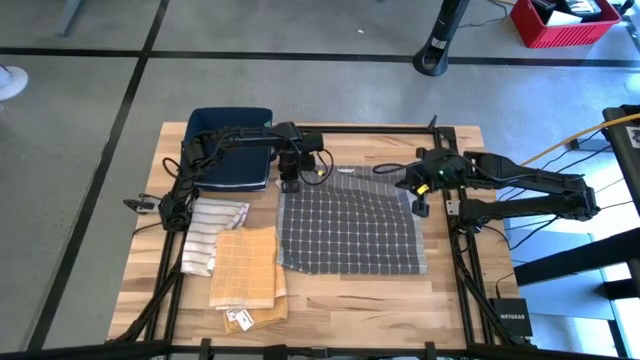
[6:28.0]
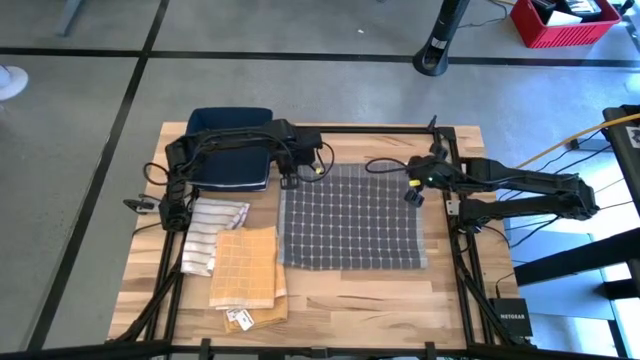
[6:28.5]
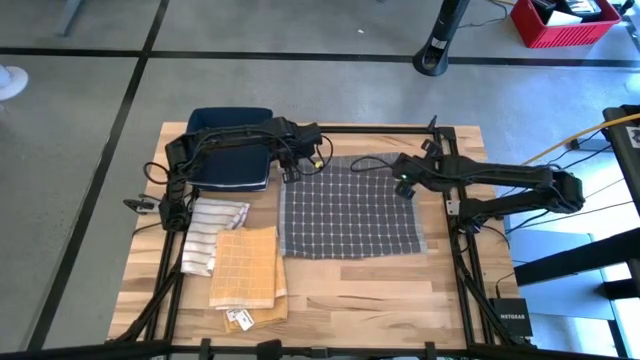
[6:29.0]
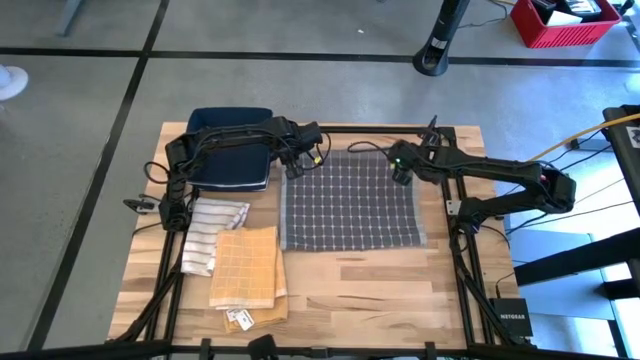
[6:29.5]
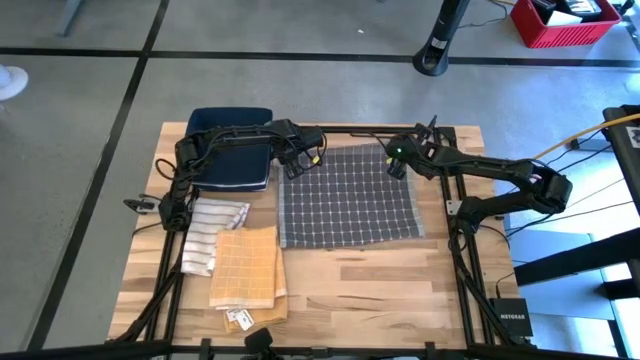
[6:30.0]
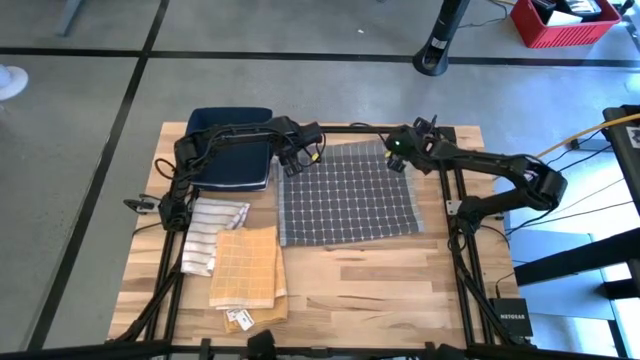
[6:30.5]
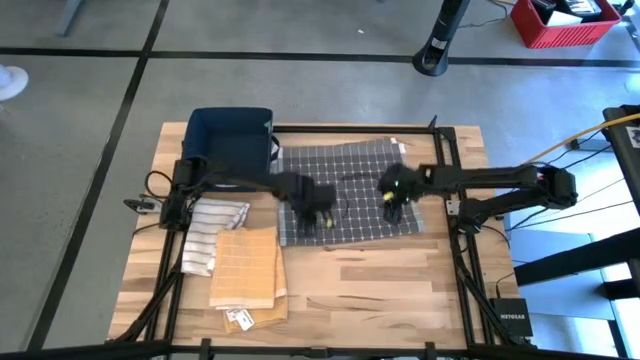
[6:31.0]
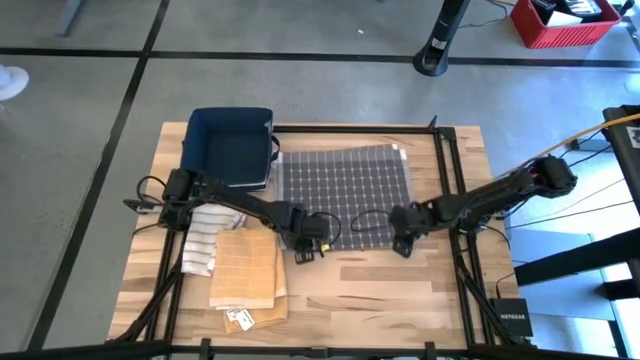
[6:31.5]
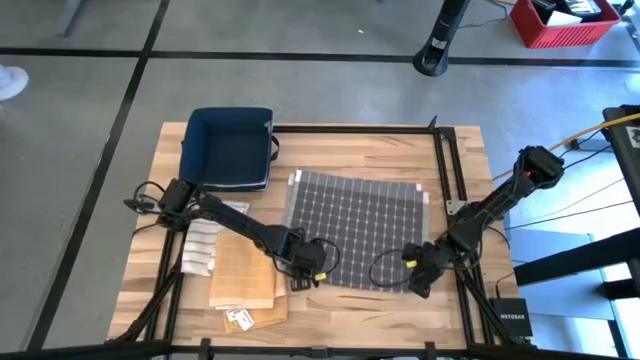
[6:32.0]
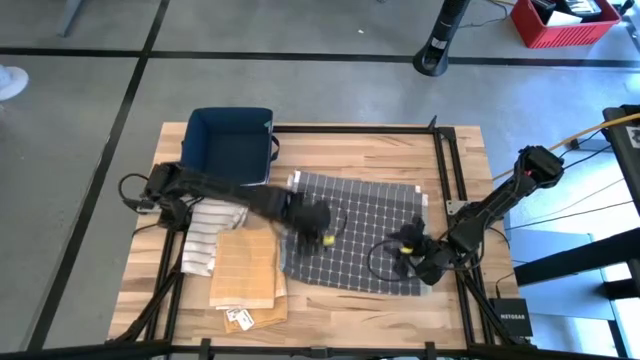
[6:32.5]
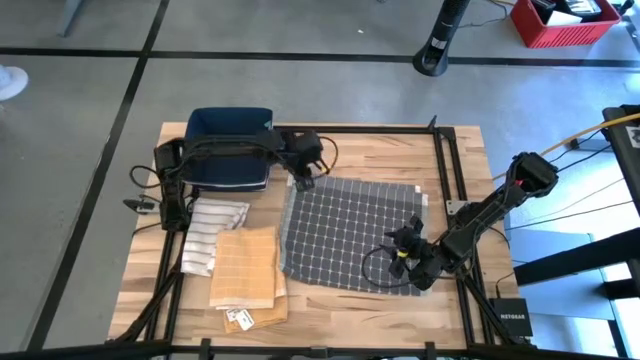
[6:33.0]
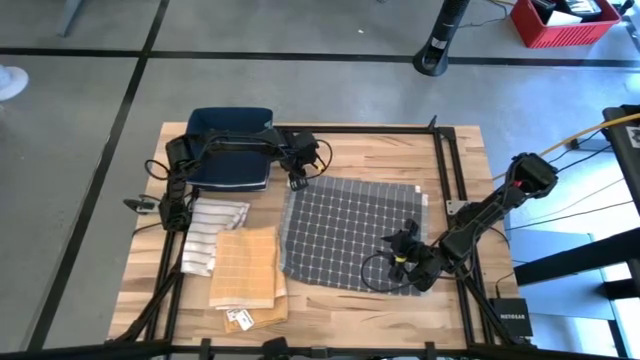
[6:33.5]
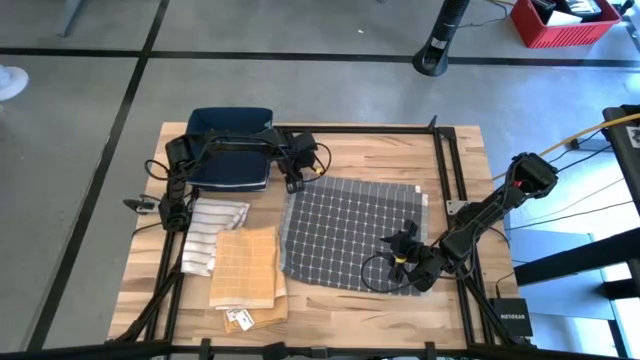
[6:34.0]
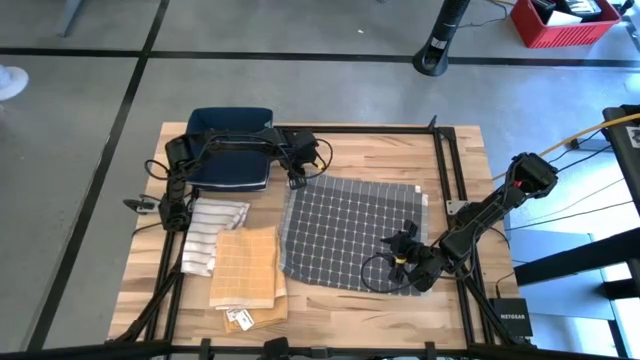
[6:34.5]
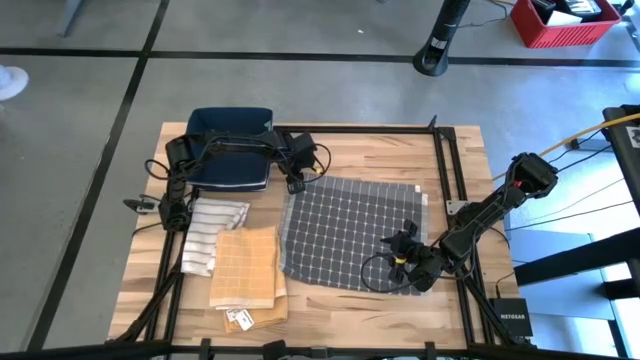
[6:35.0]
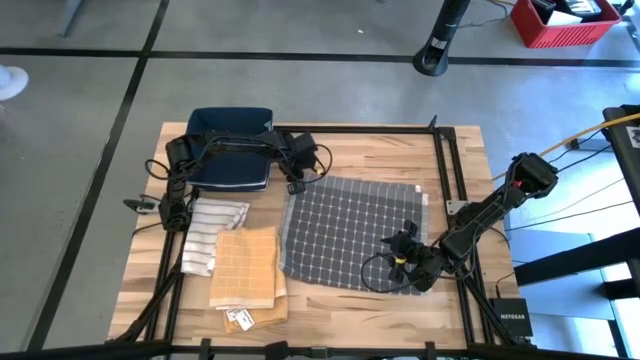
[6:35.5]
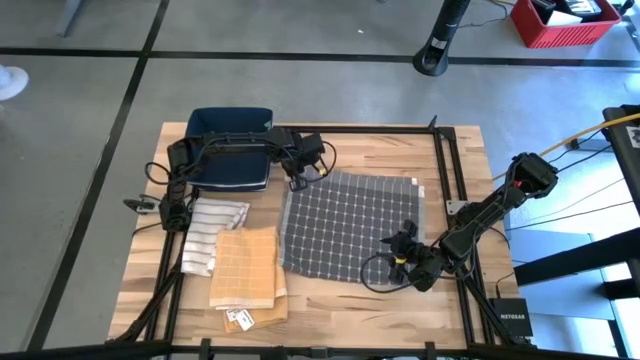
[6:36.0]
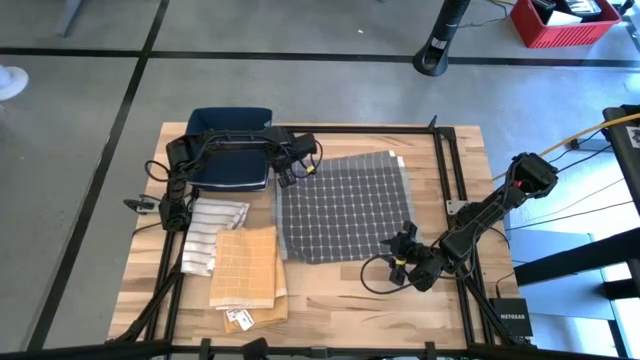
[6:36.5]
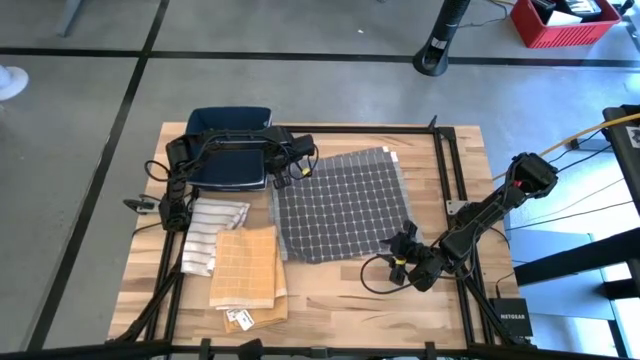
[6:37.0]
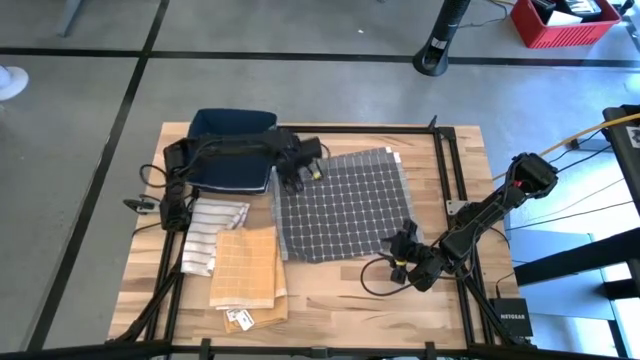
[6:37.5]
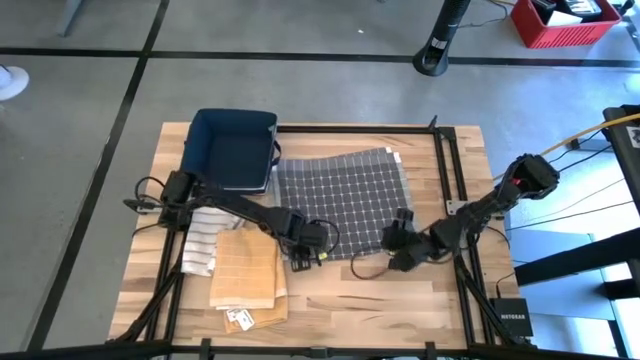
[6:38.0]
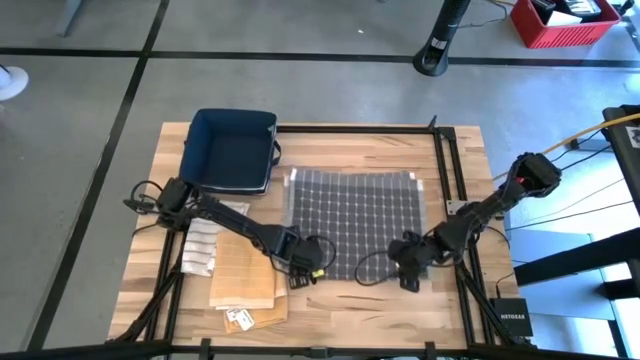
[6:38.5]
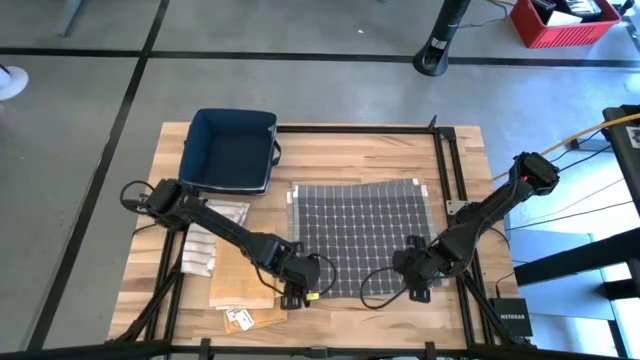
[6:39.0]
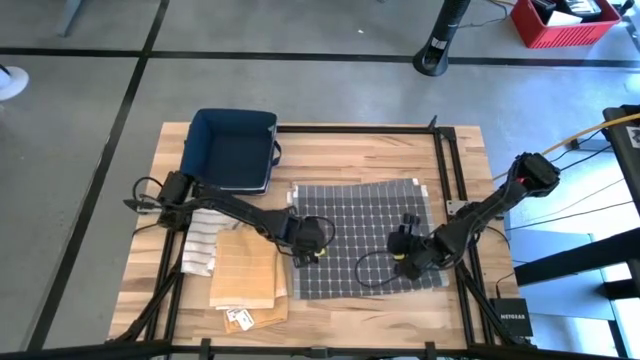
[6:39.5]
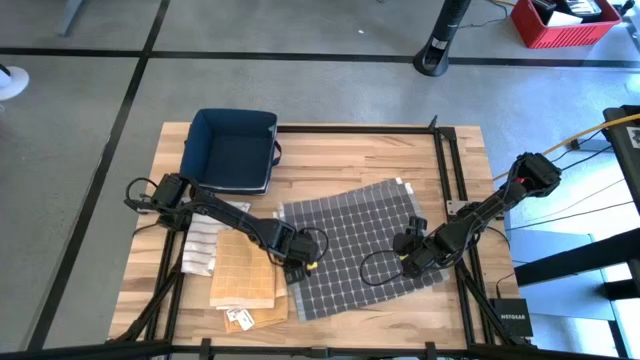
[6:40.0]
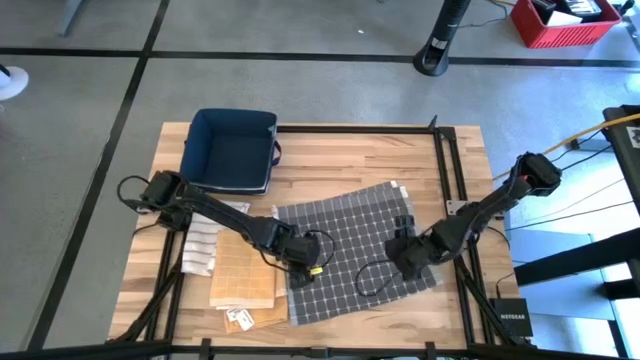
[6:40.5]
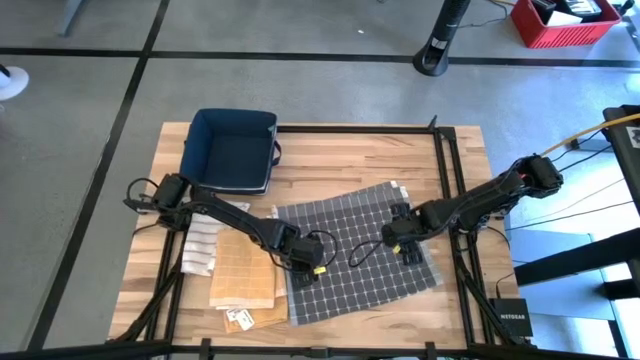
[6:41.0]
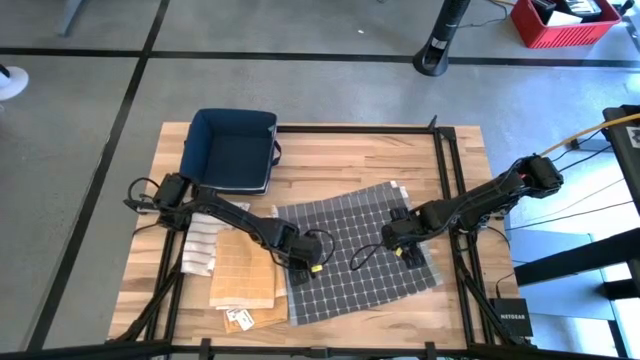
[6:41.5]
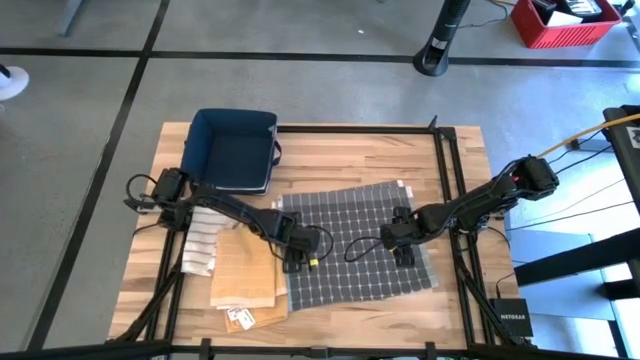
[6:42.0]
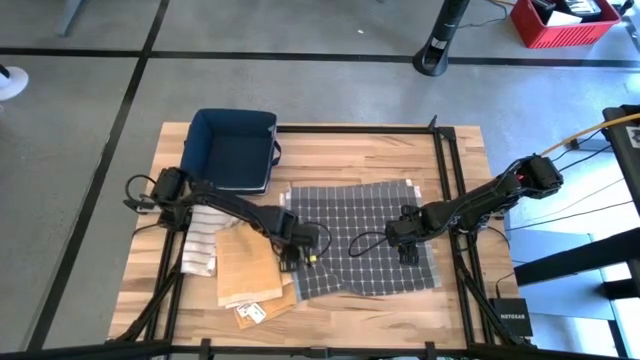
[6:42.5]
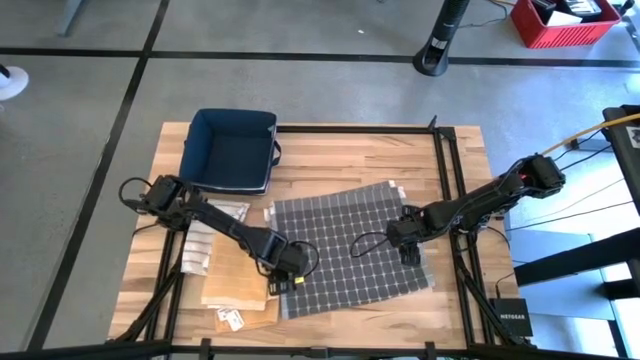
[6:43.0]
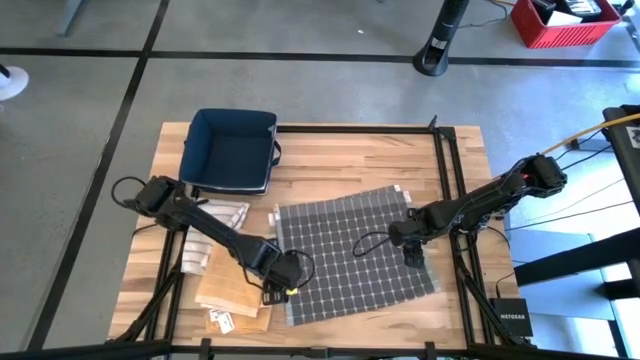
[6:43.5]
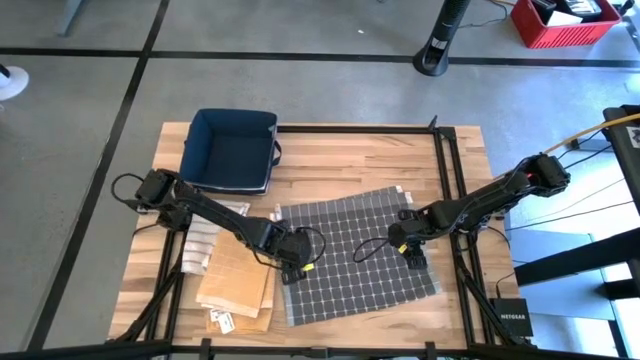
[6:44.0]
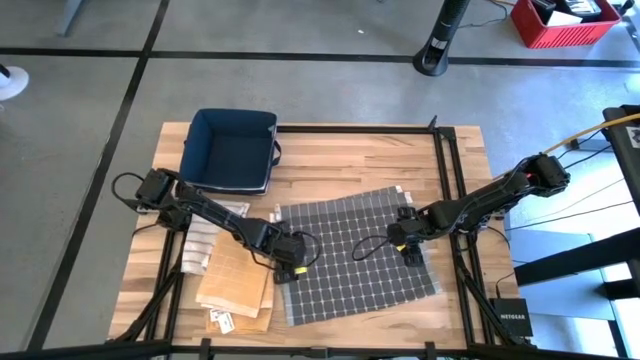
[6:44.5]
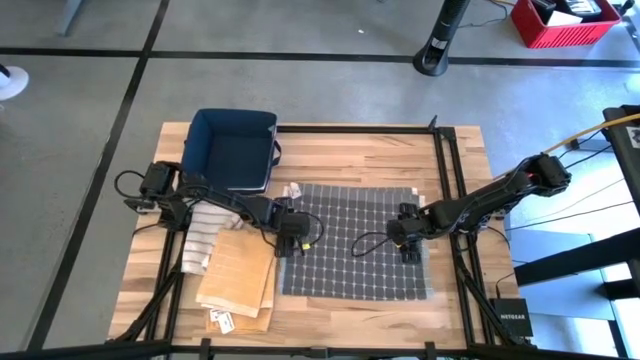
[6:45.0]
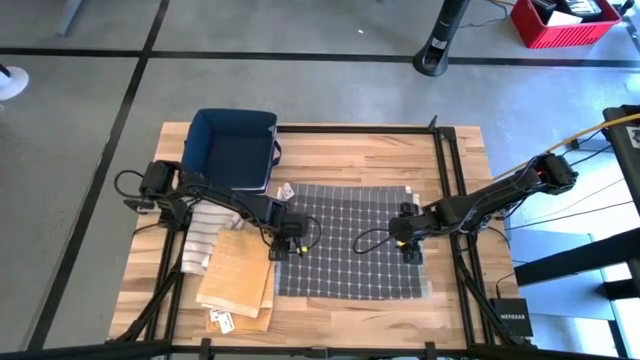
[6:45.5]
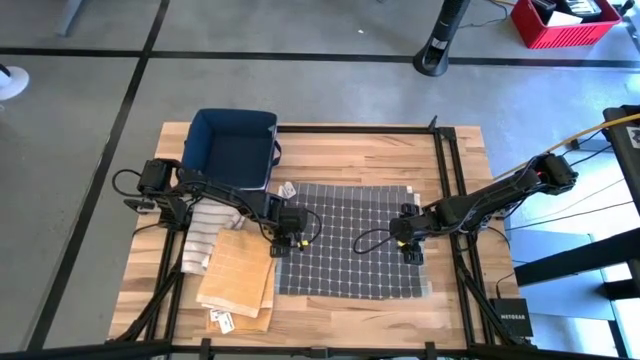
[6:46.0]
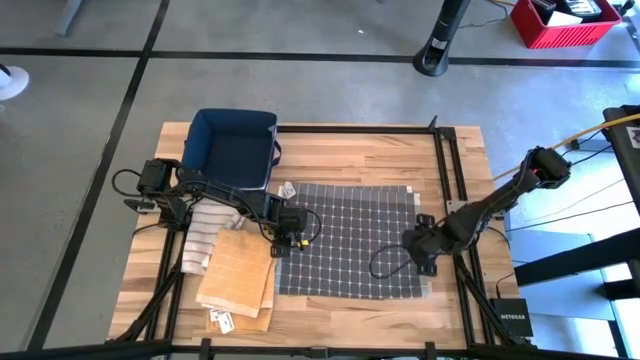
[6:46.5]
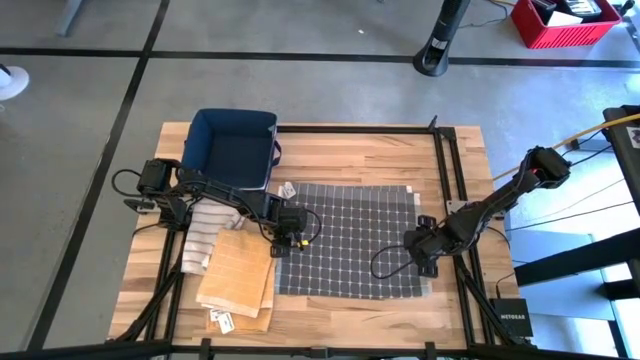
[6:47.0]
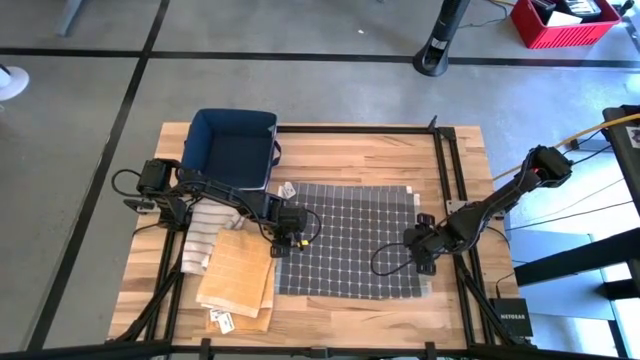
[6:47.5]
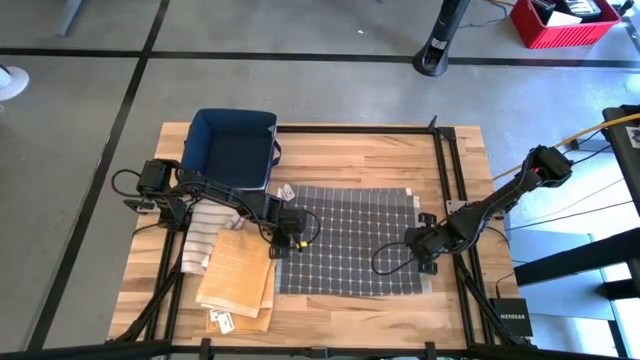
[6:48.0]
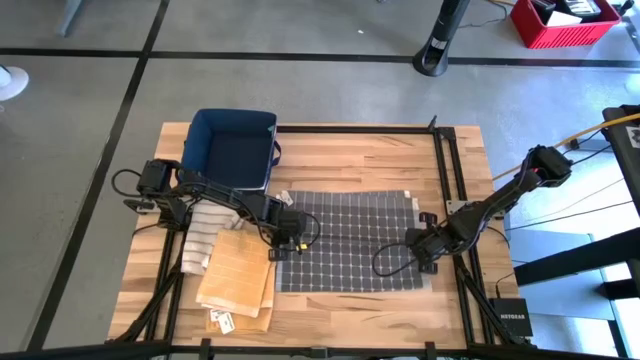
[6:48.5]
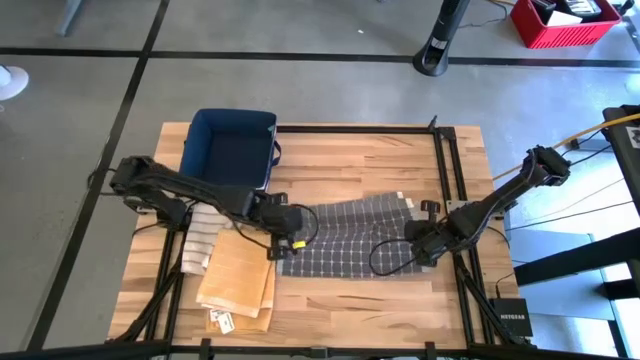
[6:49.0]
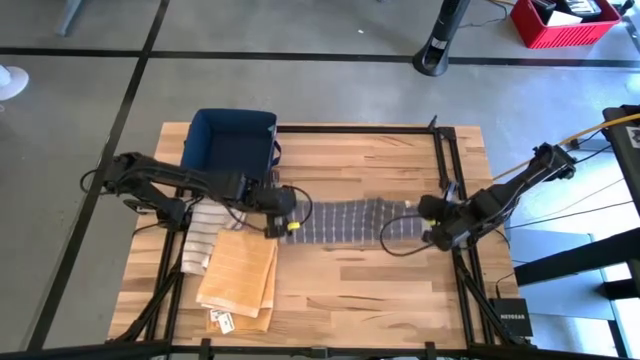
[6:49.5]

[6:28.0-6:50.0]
Task: Fold towel
Fold the gray pattern towel
